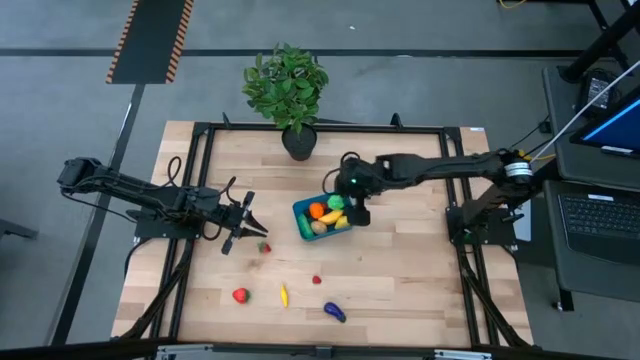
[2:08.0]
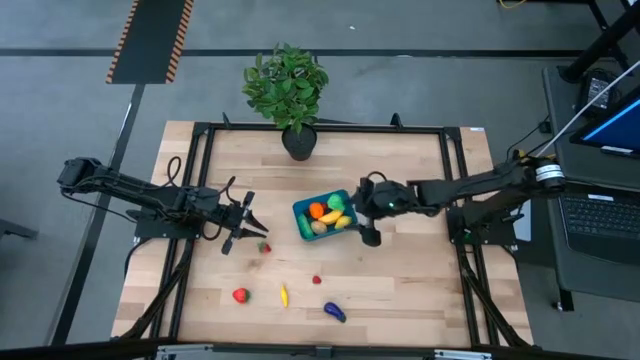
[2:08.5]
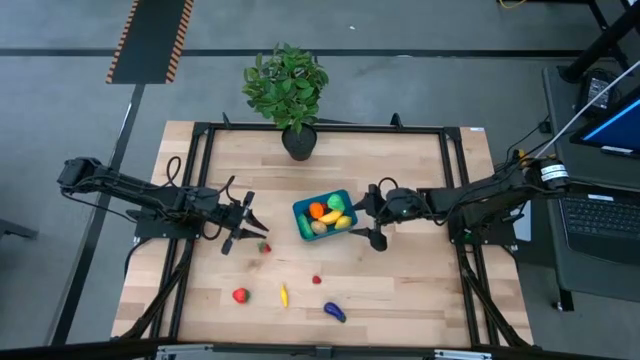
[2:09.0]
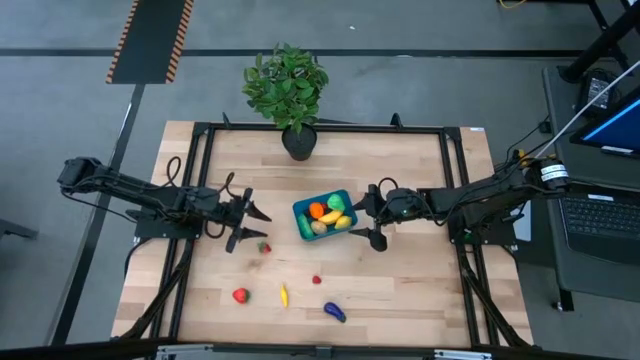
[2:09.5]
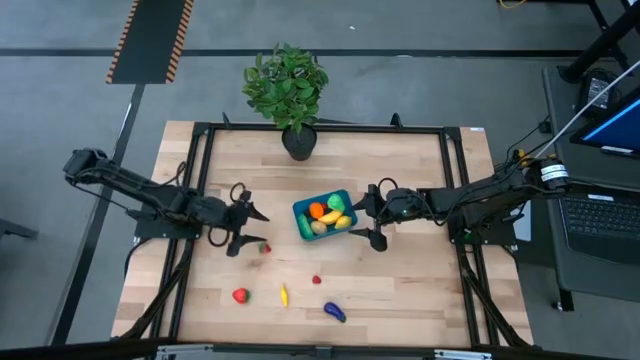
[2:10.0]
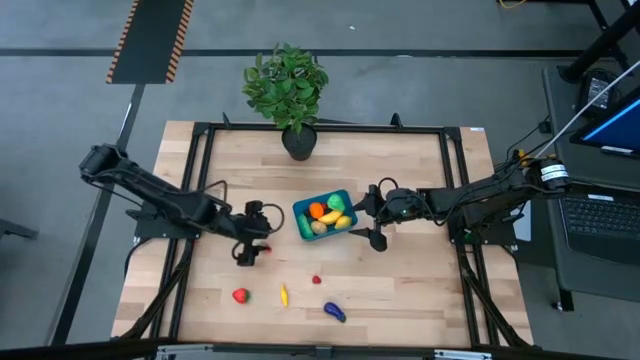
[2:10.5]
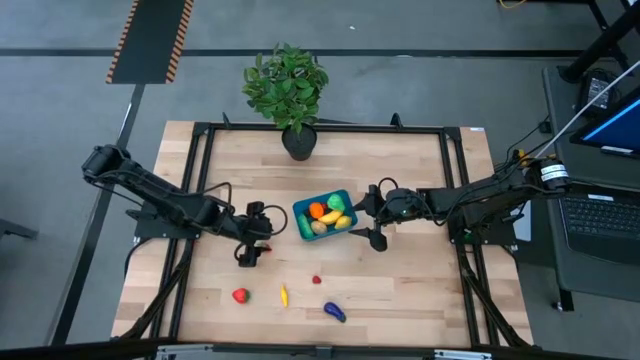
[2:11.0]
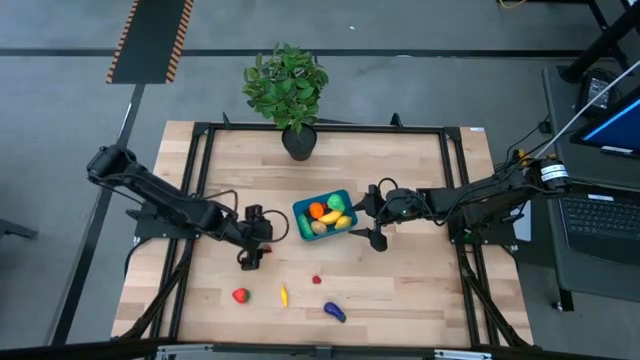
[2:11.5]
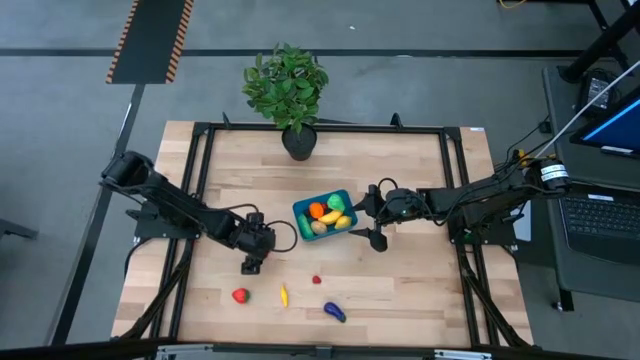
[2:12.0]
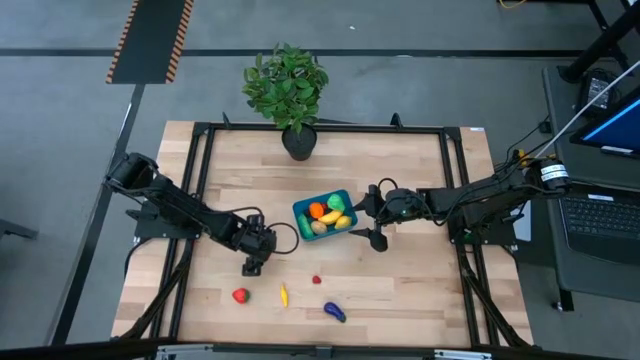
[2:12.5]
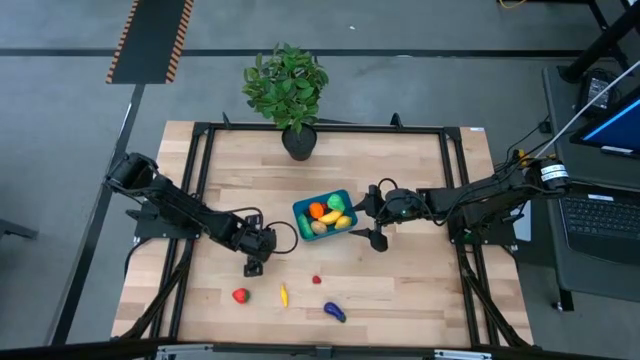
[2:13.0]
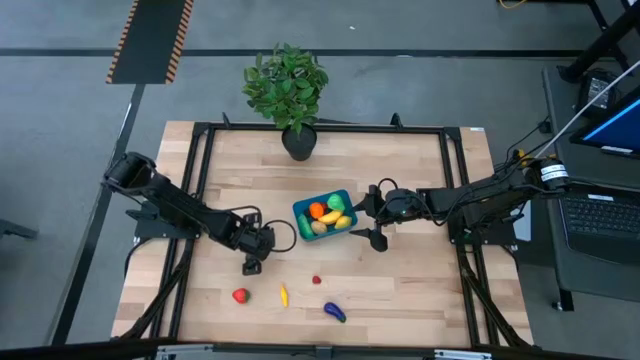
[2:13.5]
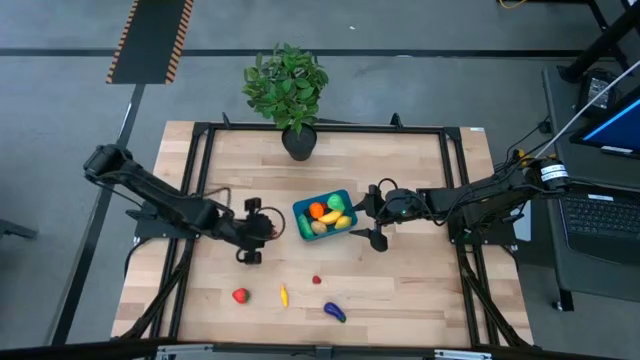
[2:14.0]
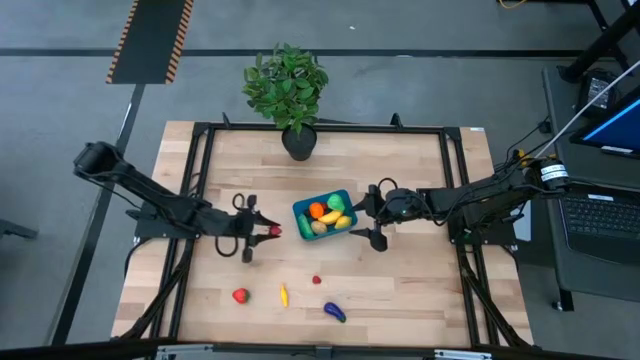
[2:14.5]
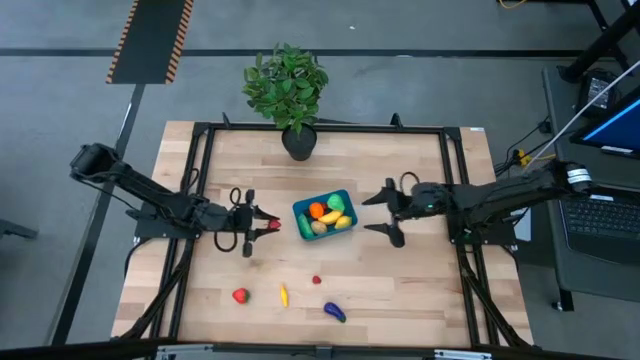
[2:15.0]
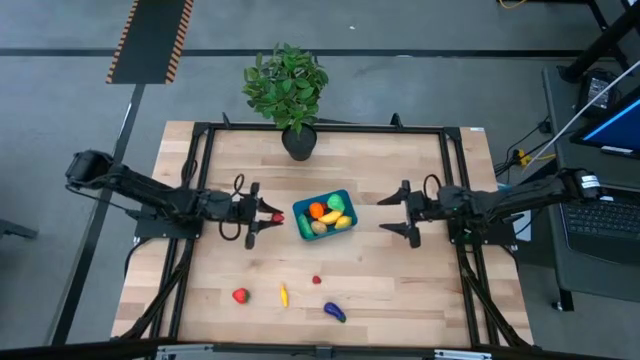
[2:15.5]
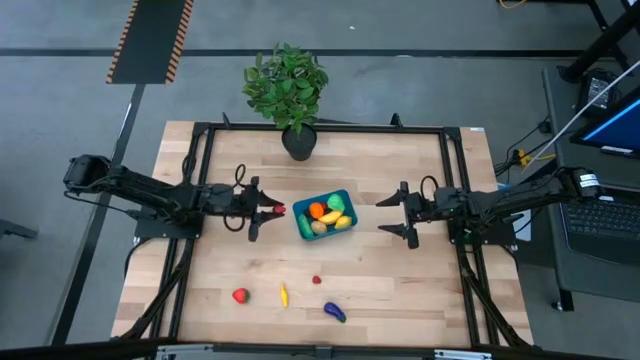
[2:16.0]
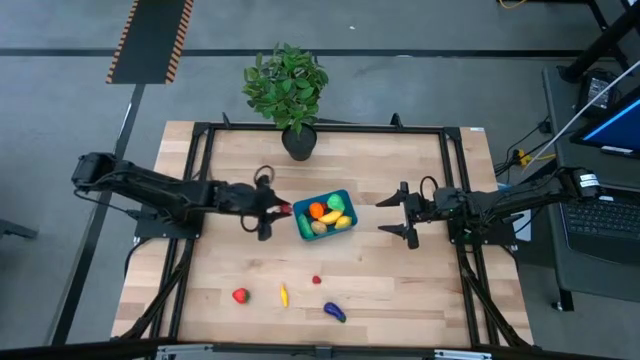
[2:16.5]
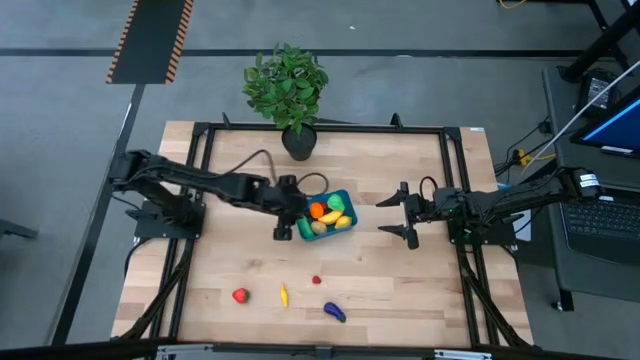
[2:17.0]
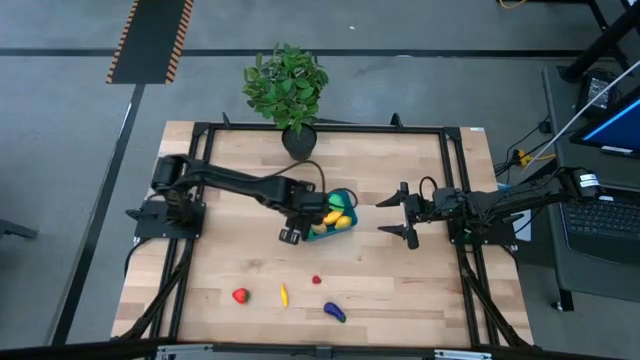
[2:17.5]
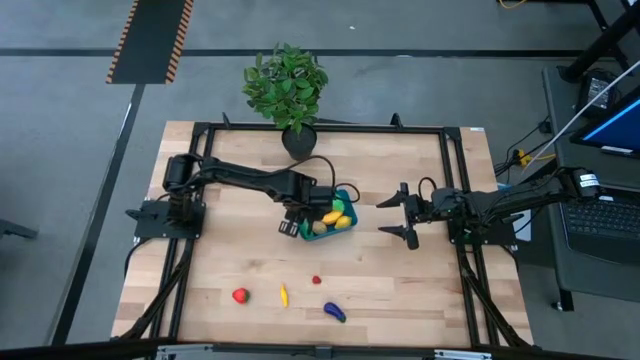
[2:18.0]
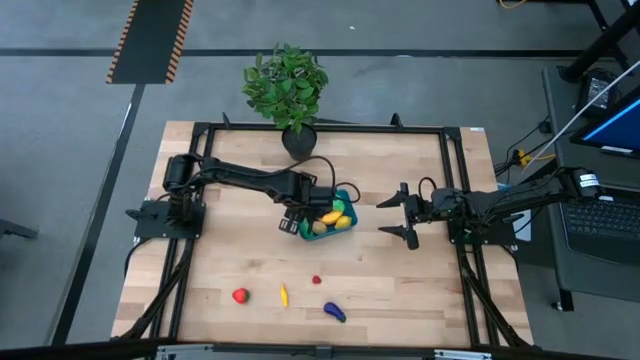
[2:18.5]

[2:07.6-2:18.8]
Task: Pick and placing Produce into tupperware
Put the top red strawberry into the blue bin

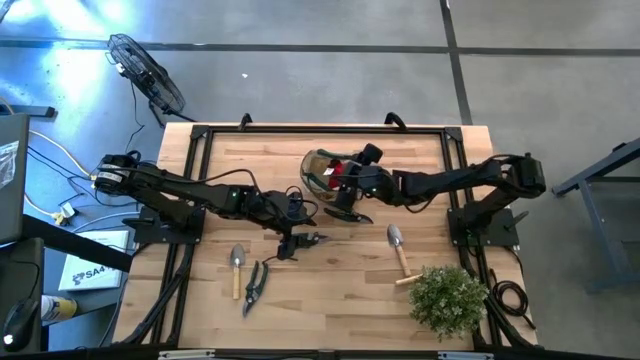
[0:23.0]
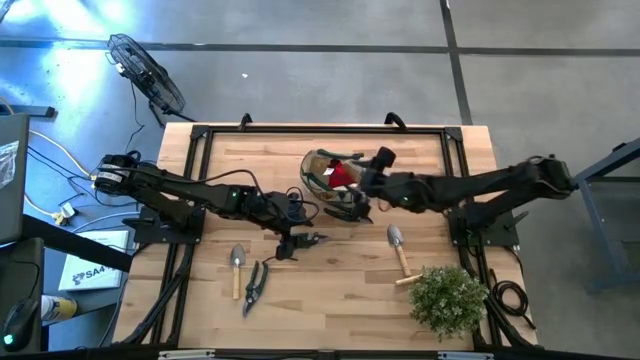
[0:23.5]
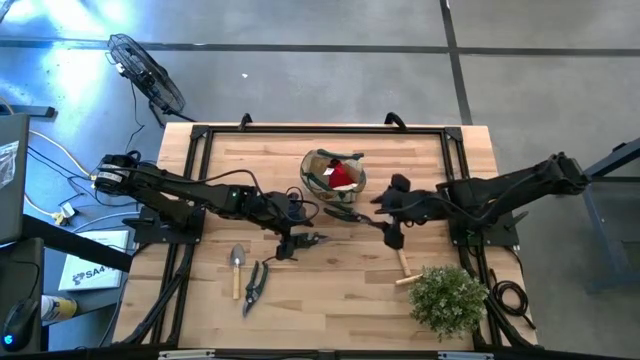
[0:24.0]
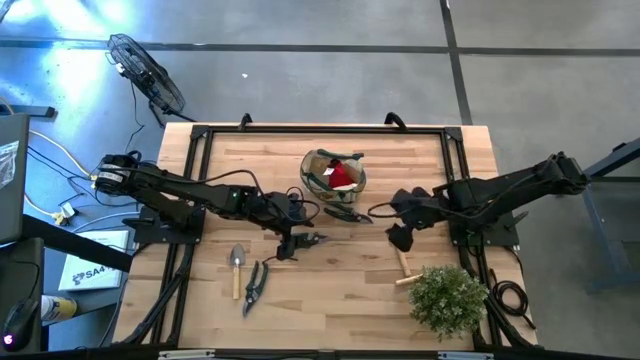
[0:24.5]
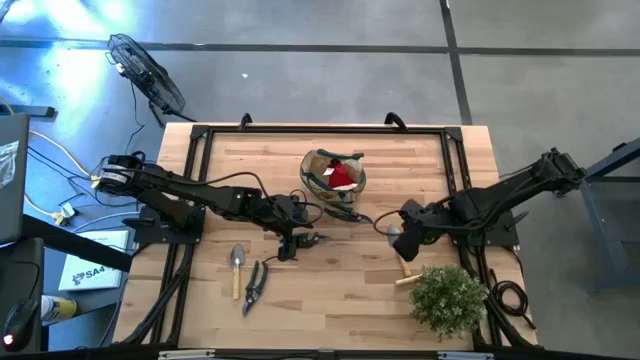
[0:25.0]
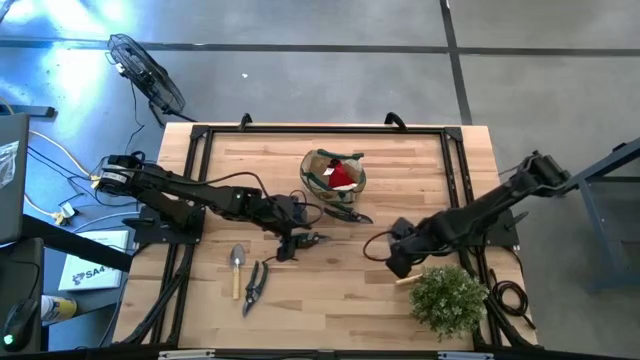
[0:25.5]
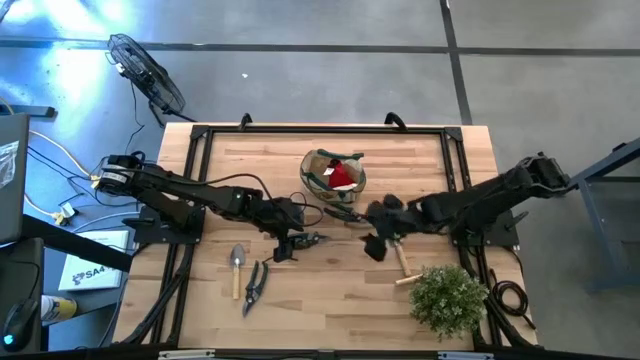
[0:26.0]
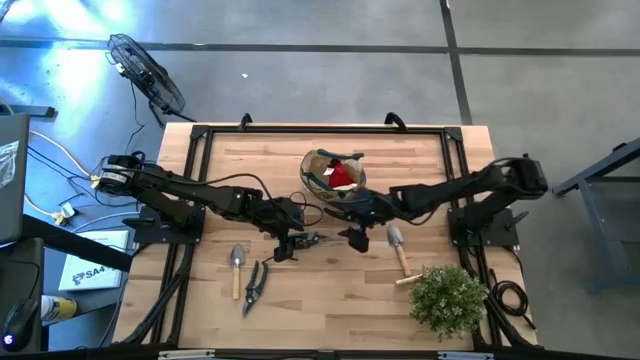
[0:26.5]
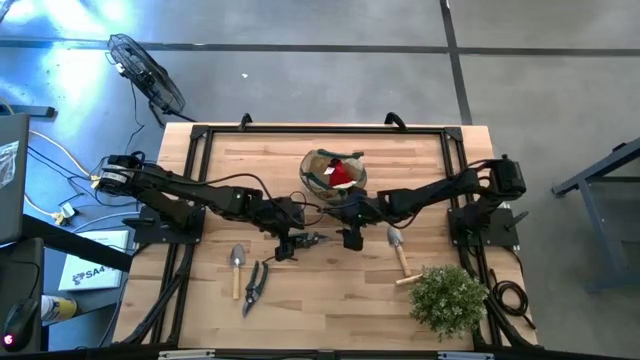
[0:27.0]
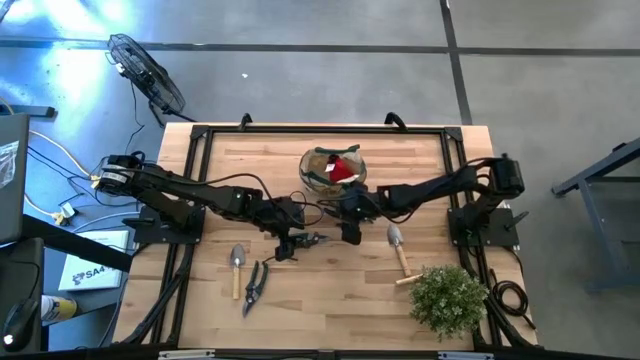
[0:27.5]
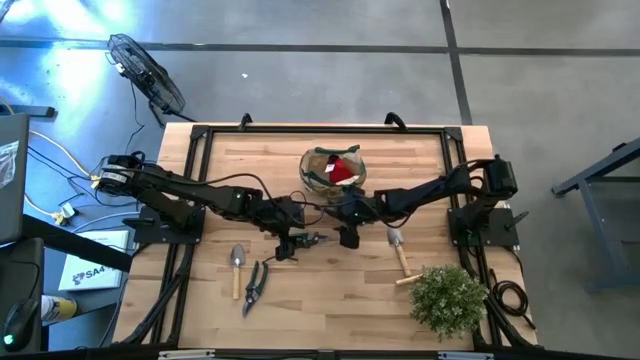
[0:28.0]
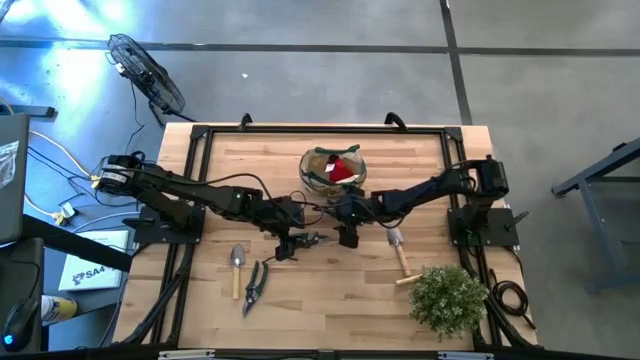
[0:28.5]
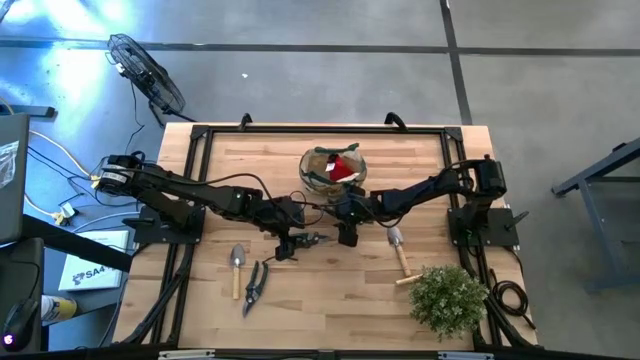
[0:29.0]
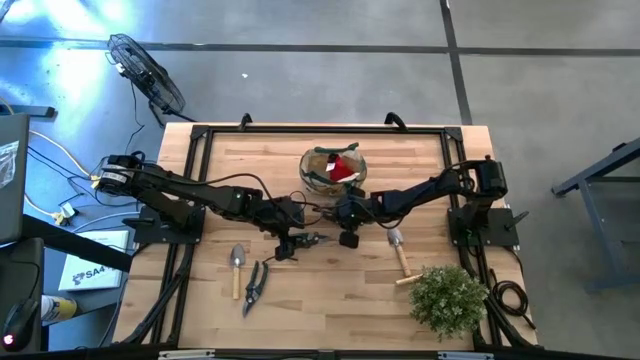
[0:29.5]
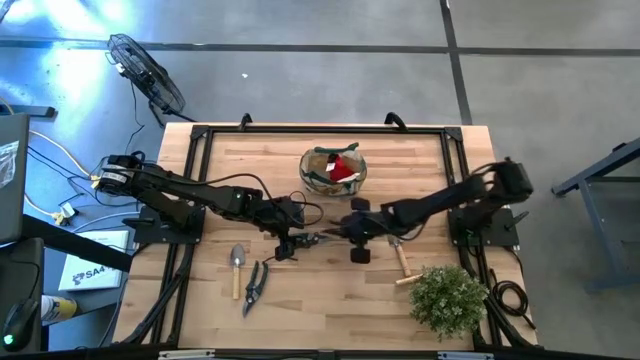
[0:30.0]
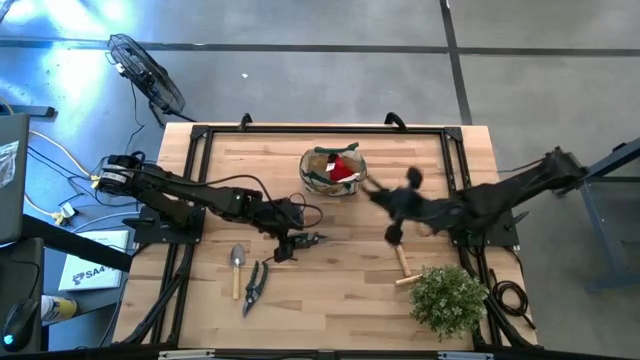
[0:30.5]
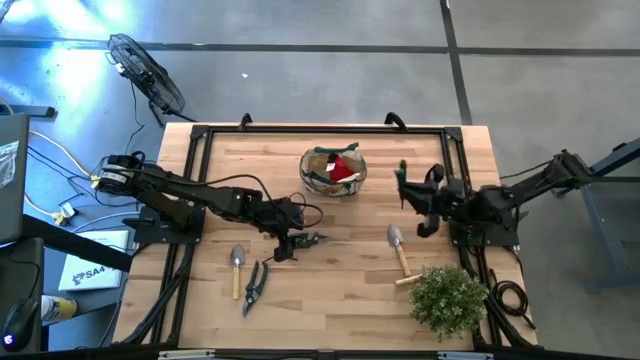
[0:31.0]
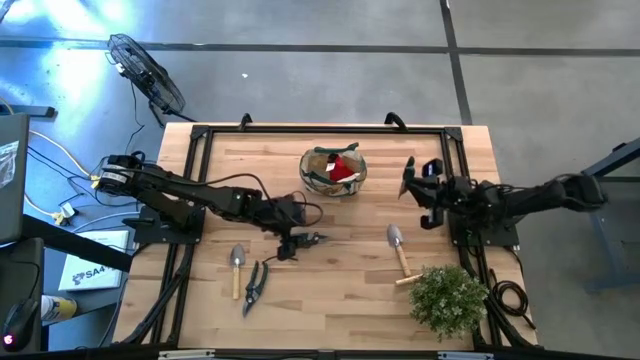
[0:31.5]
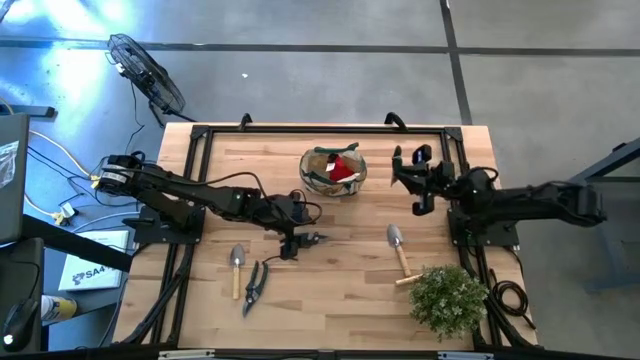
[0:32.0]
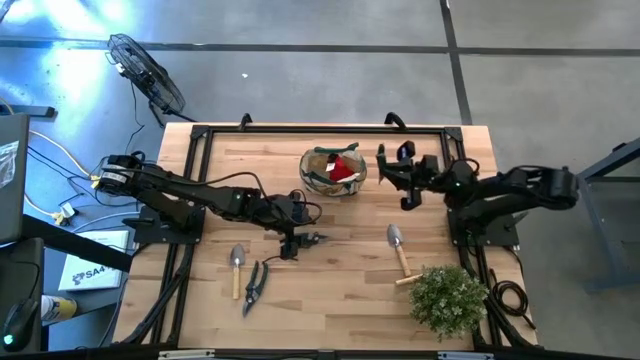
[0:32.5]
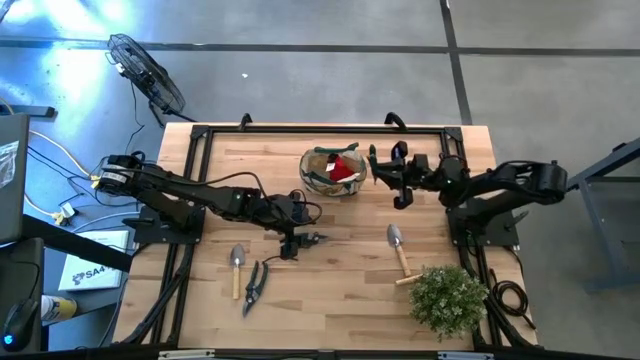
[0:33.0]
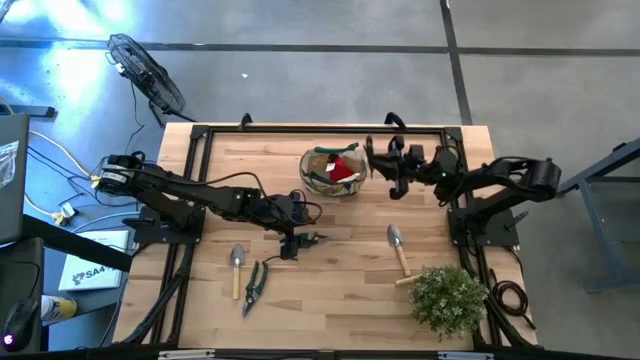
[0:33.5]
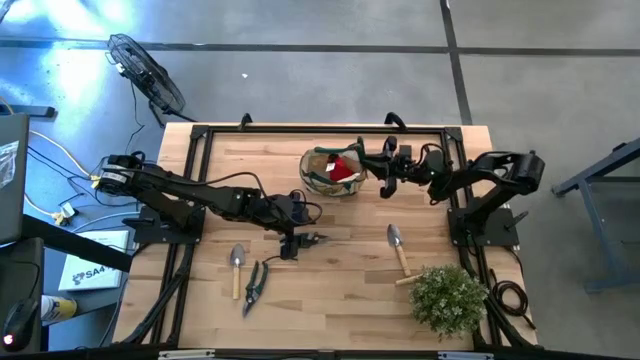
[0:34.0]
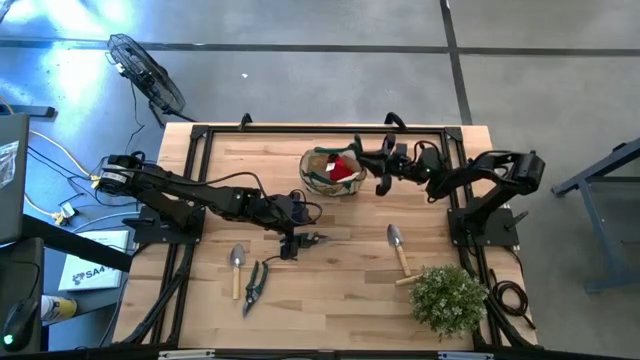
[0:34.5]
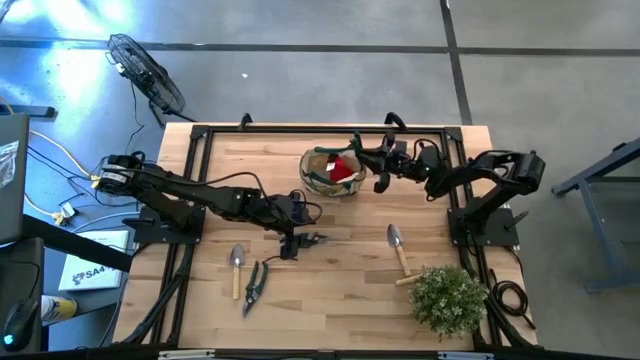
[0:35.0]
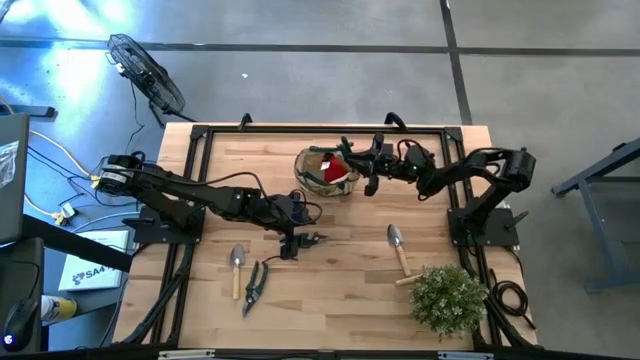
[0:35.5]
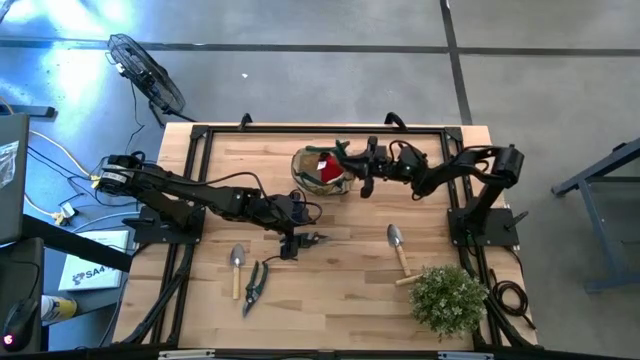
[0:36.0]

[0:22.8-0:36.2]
Task: Pick & Place Garden tools in Gardening bag
Put the top right green shear scissors into the light brown gardening bag
